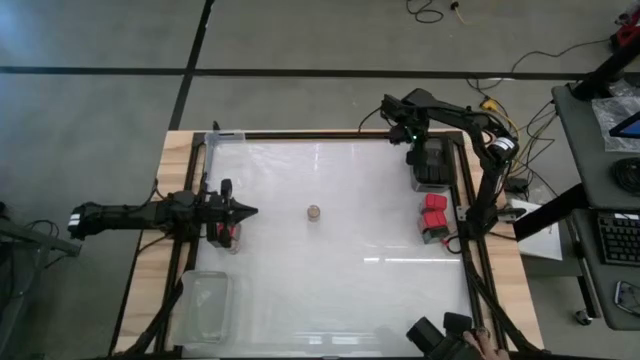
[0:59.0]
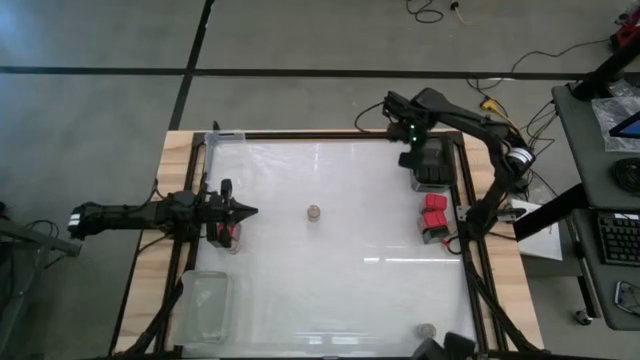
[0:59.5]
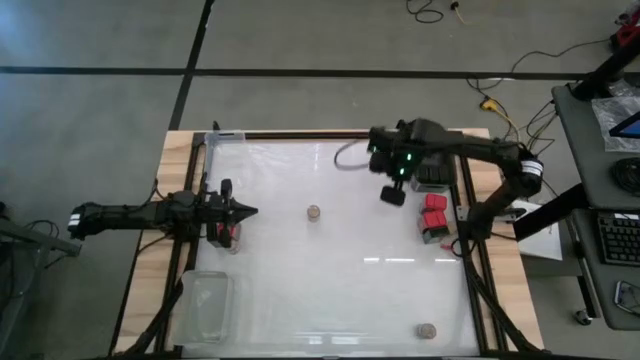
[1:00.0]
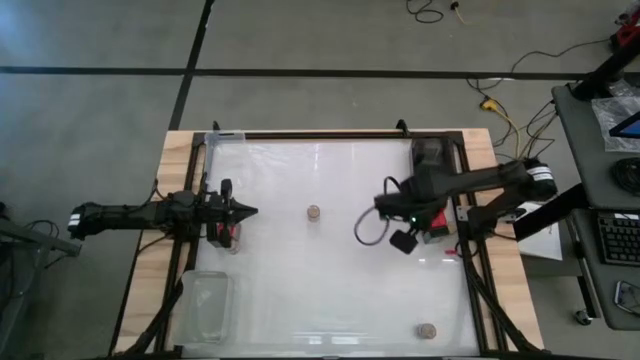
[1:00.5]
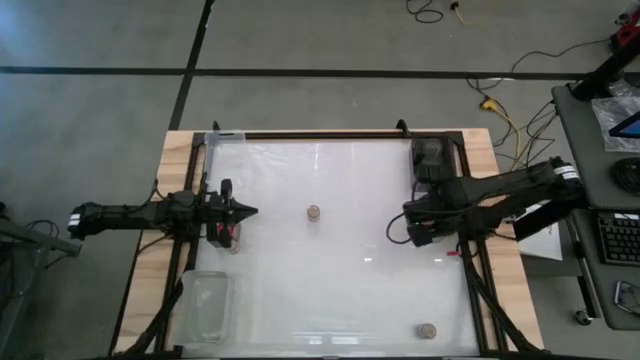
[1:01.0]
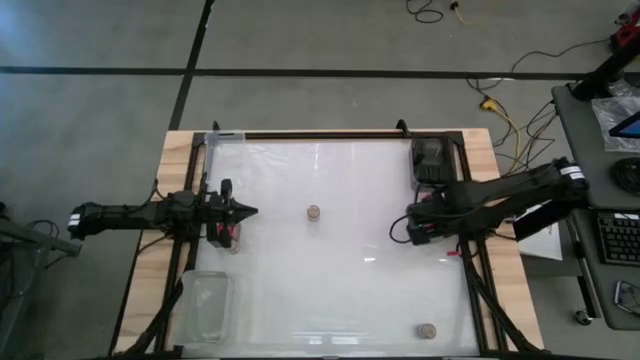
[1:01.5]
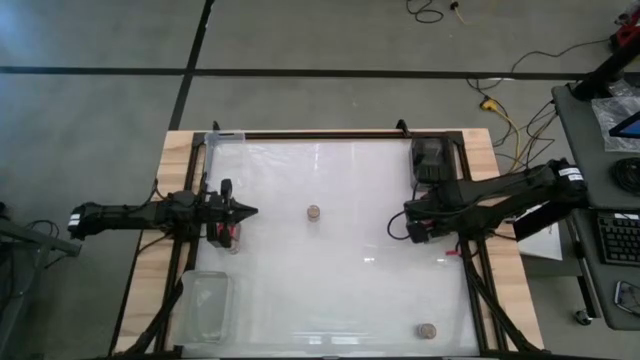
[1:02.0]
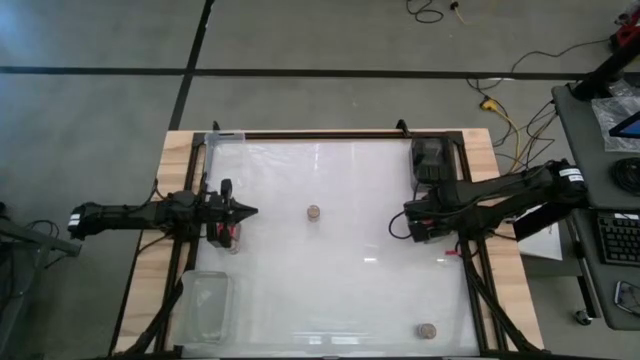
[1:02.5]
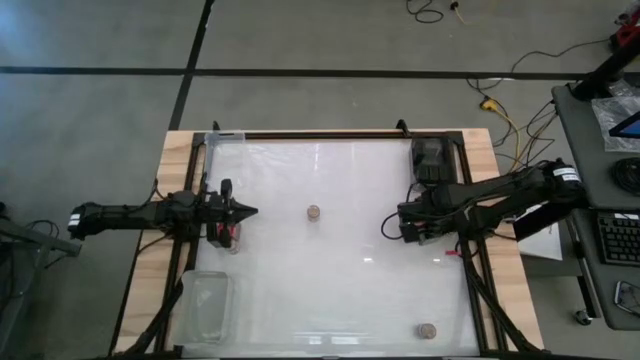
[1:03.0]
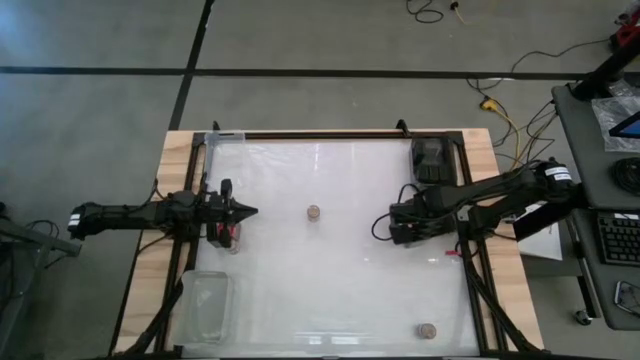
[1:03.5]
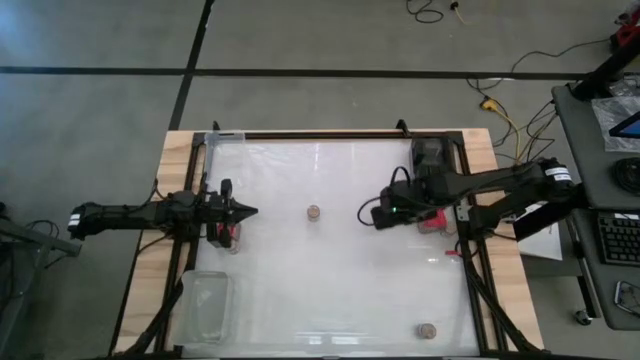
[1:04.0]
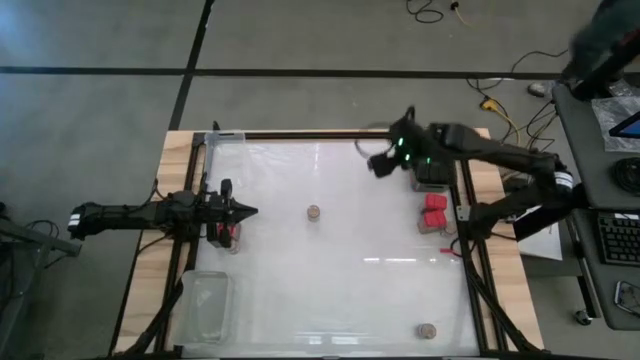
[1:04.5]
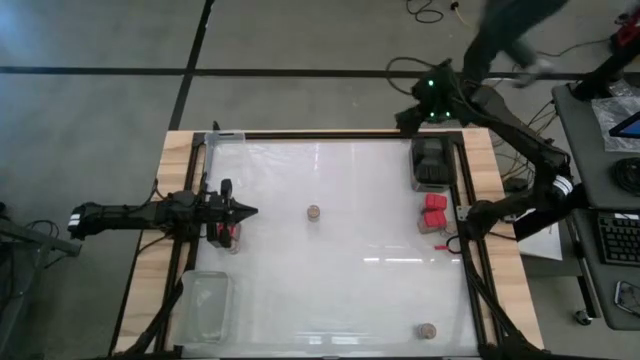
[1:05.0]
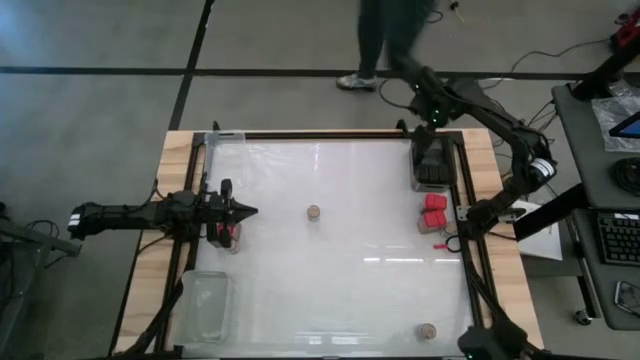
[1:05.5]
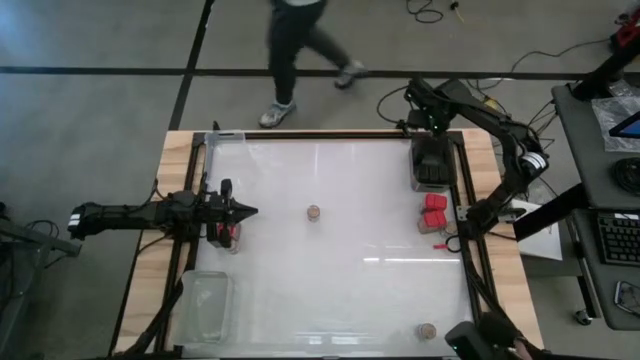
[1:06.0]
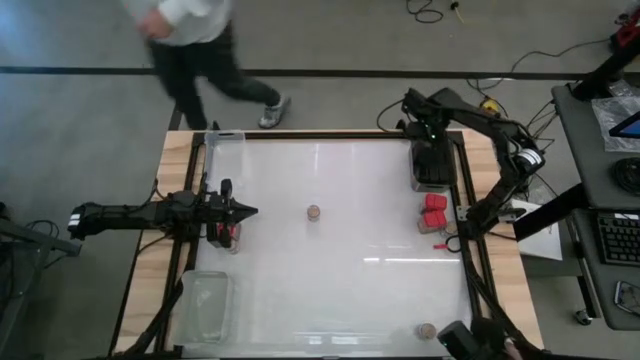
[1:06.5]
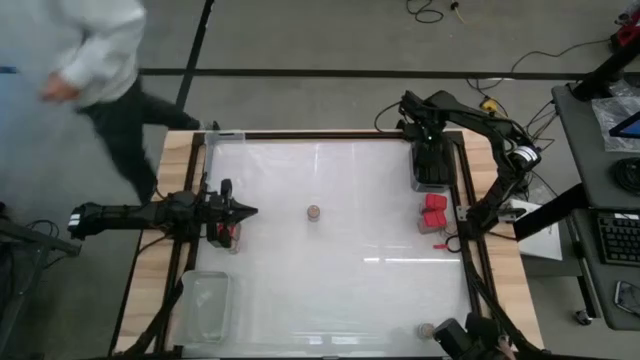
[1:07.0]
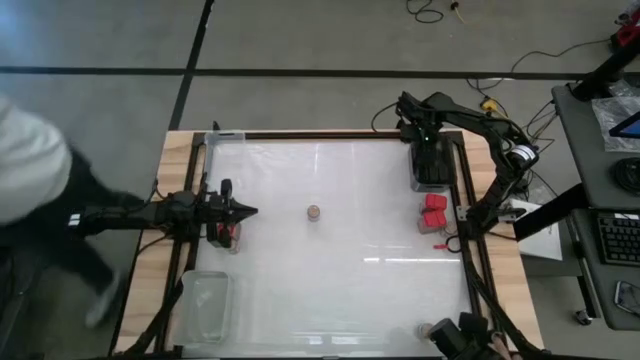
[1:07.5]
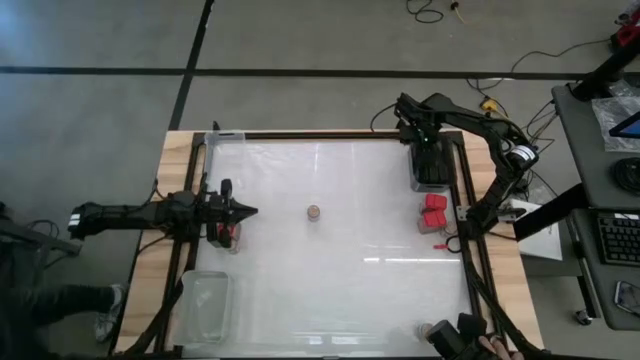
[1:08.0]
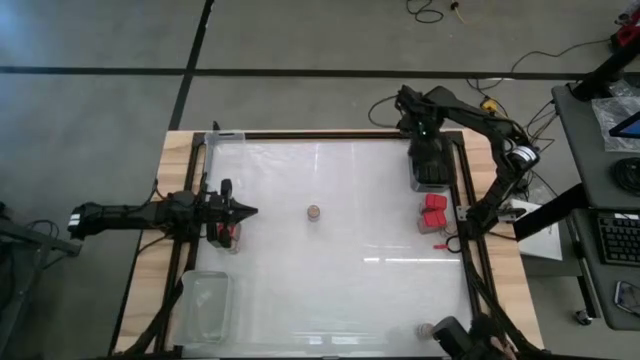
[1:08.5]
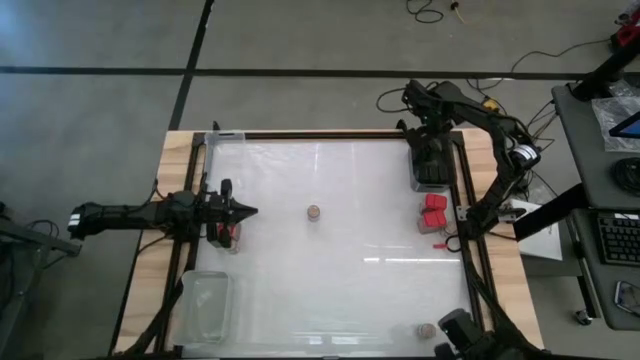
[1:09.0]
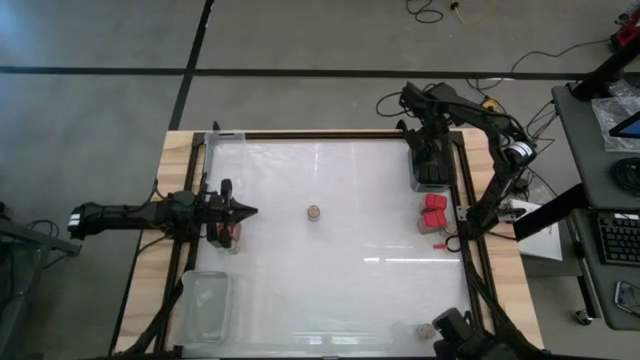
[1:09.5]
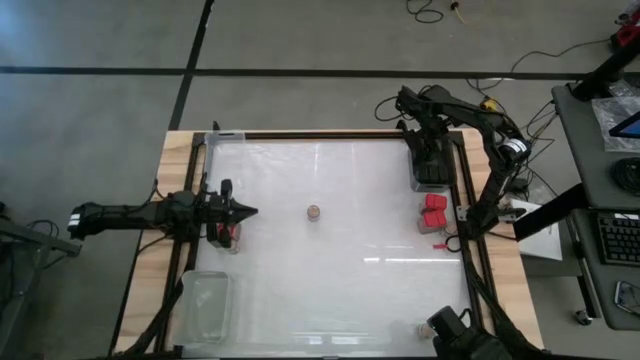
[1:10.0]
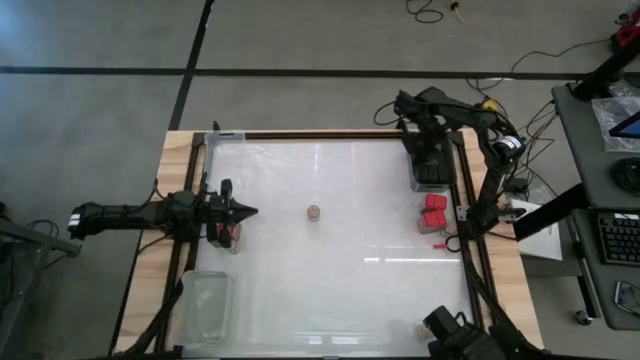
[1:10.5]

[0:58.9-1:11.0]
Task: Sort spices by type
Put the black seasoning can into the black bin

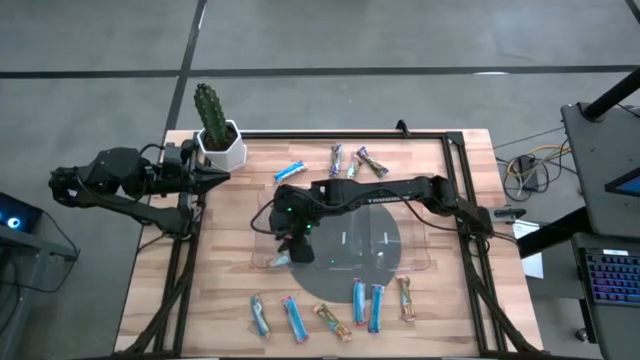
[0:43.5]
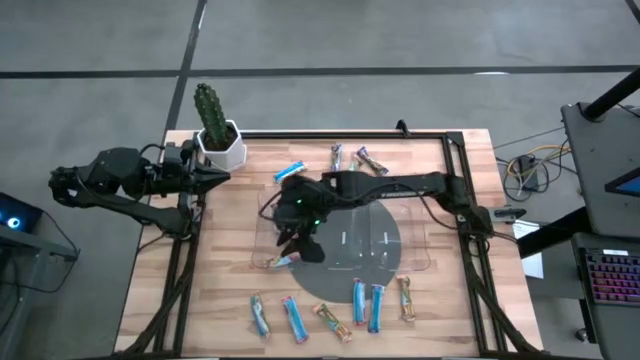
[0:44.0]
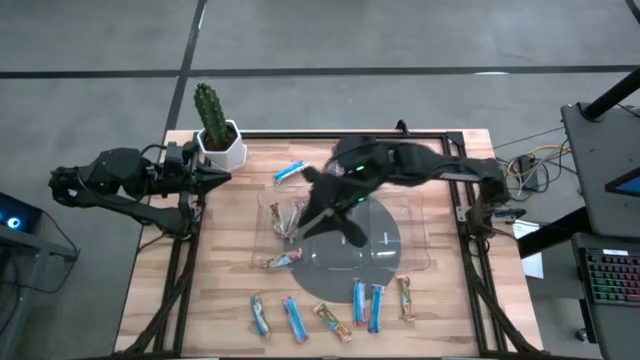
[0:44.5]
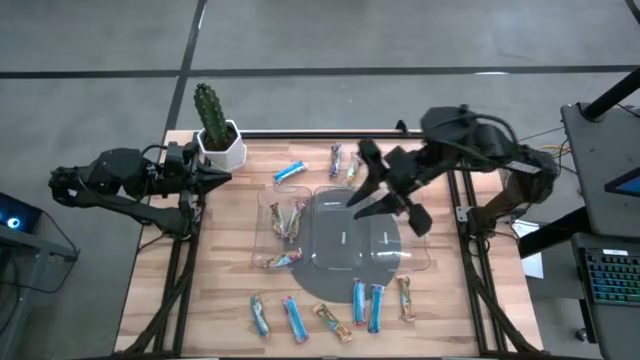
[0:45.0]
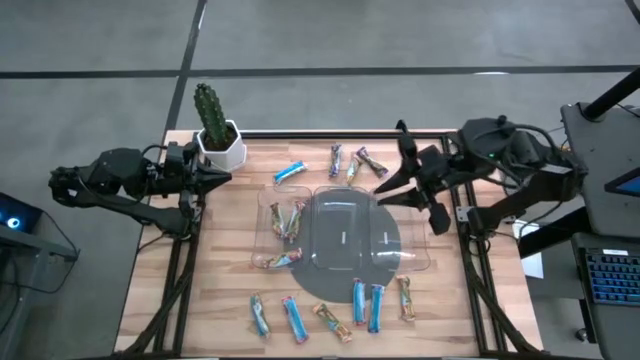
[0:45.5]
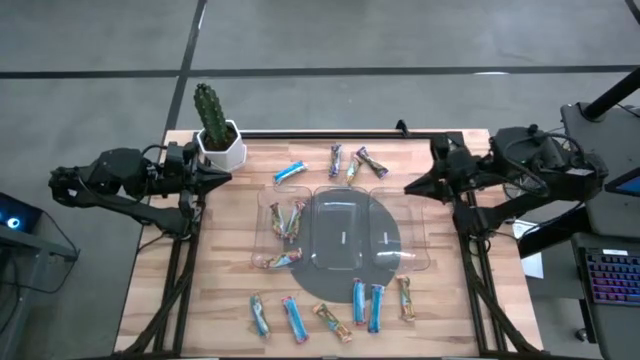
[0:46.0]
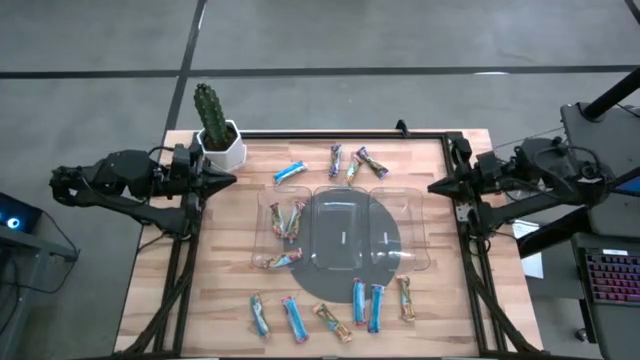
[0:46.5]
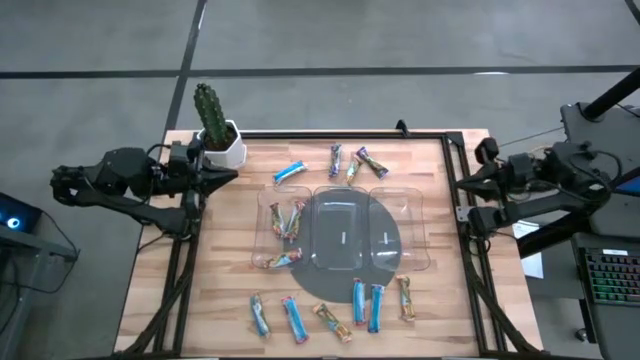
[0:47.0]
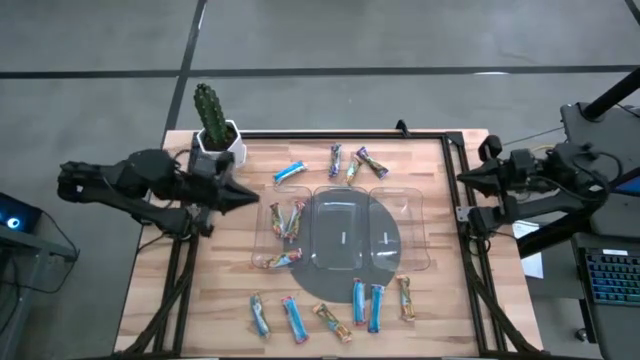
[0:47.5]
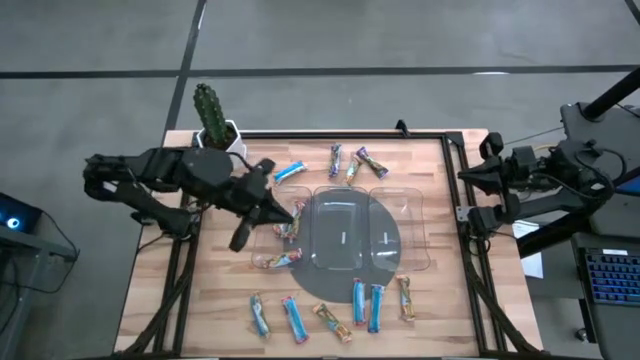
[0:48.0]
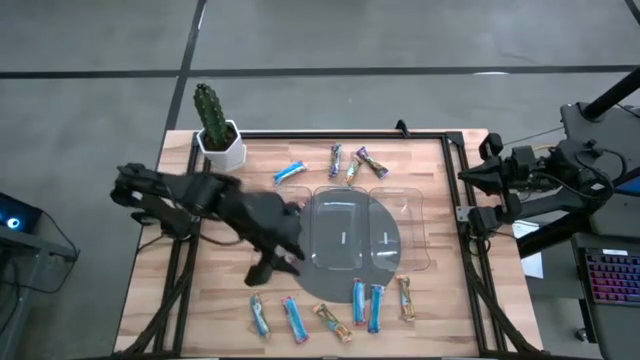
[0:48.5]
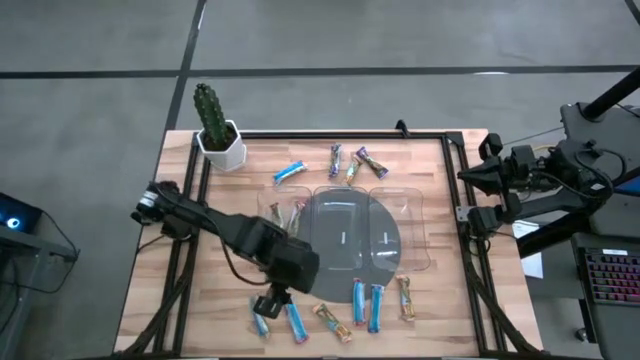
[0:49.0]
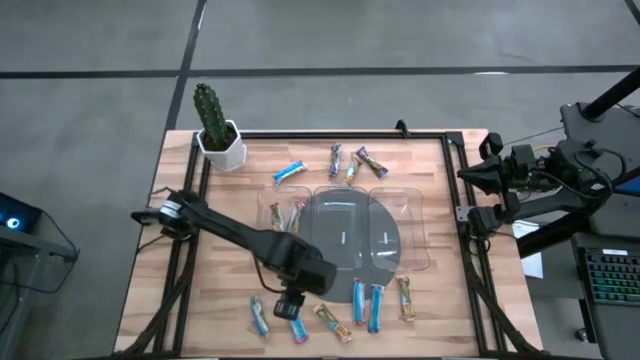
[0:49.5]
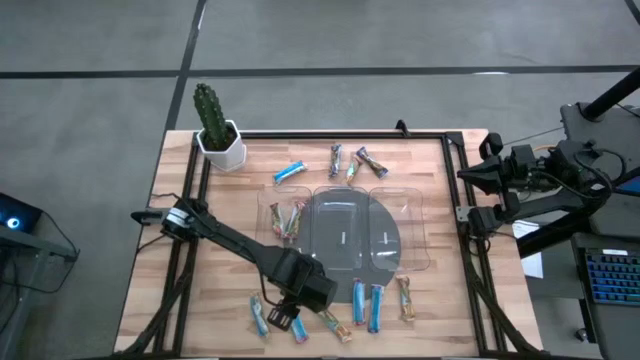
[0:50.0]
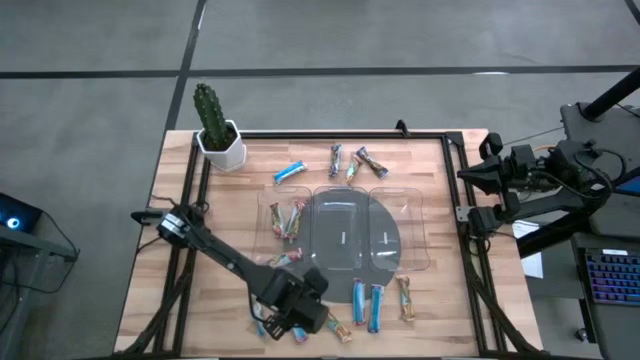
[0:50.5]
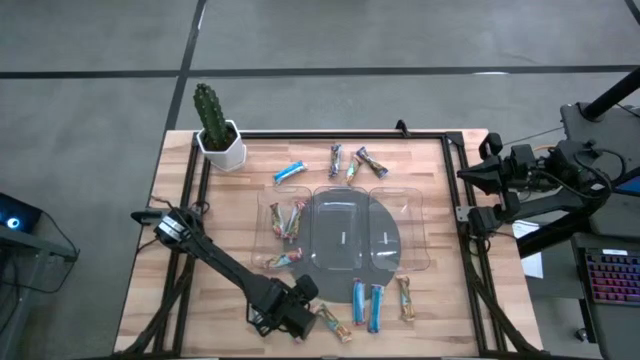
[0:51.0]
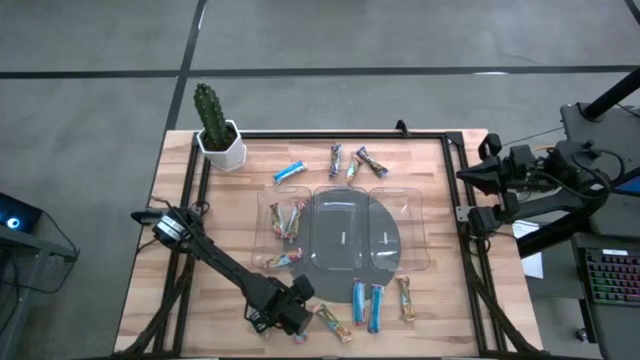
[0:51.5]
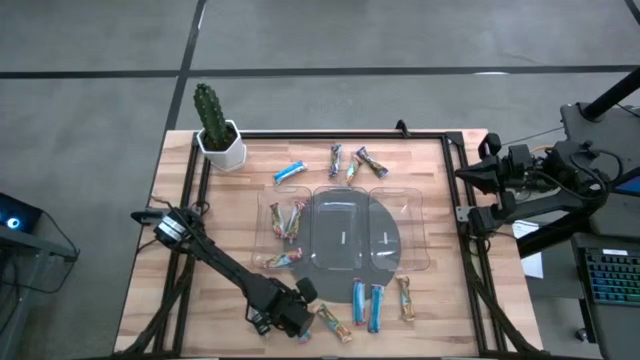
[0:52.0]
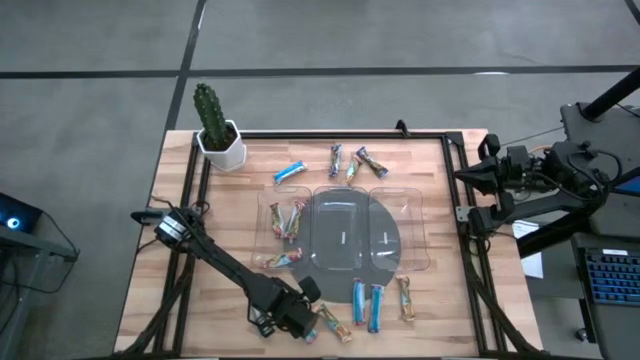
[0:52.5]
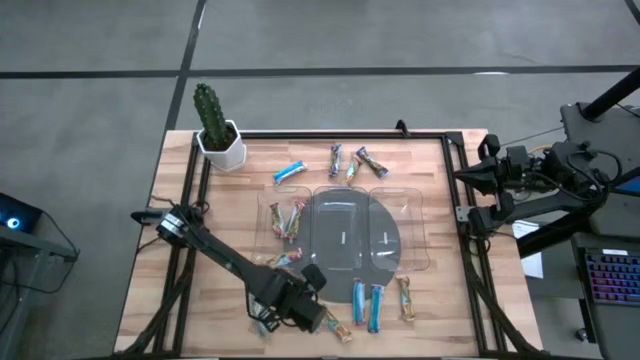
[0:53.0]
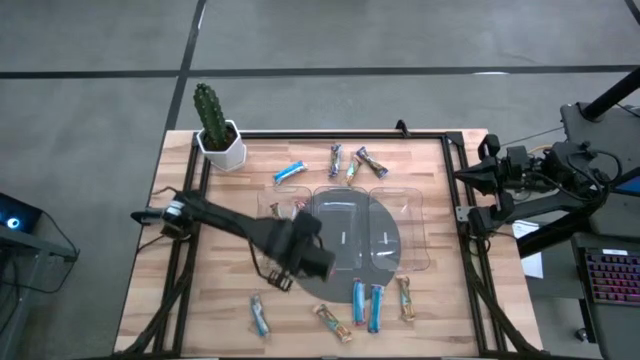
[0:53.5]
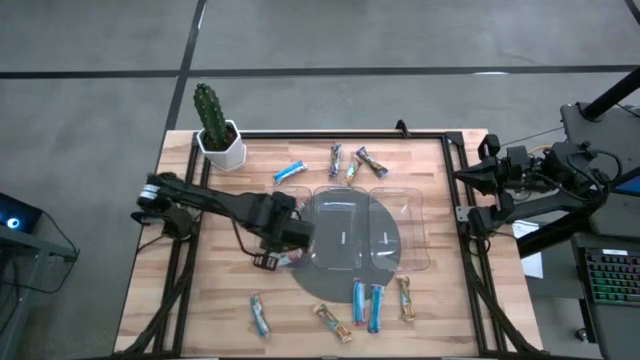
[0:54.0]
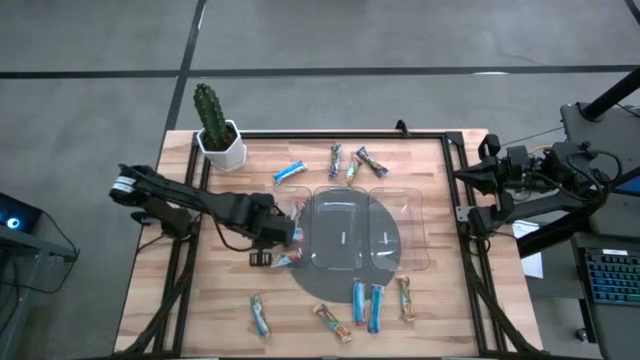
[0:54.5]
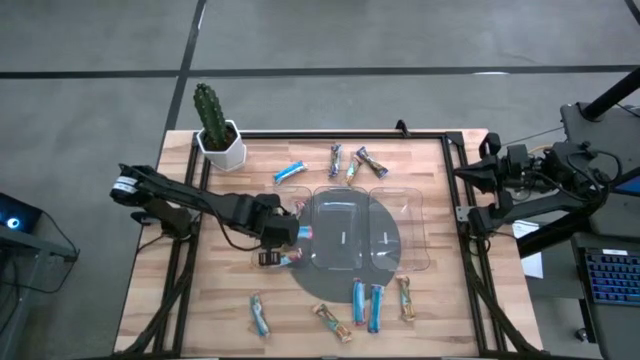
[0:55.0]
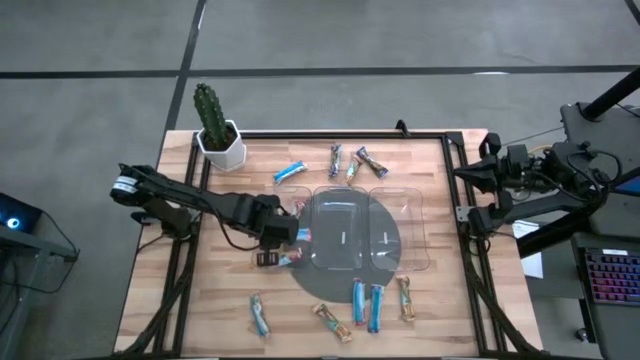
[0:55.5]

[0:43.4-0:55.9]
Task: Pick and place Granola Bars by type
Put the left red granola bar into the left transparent bin
